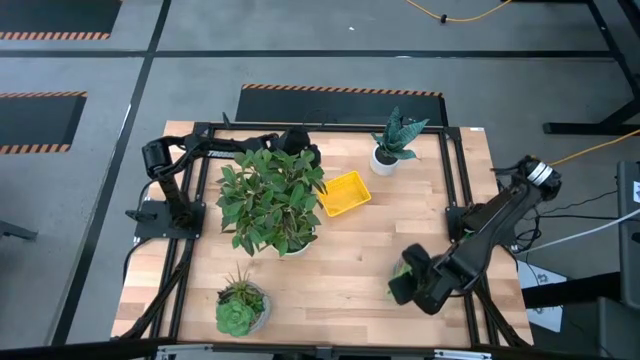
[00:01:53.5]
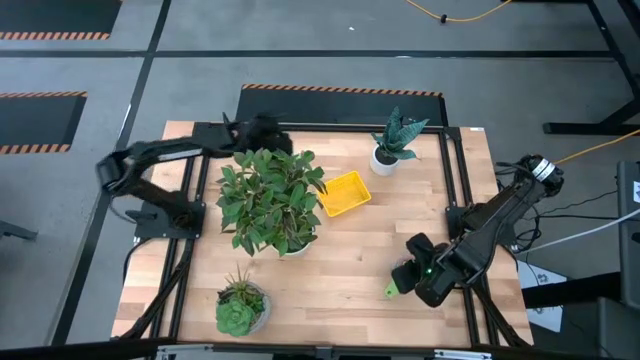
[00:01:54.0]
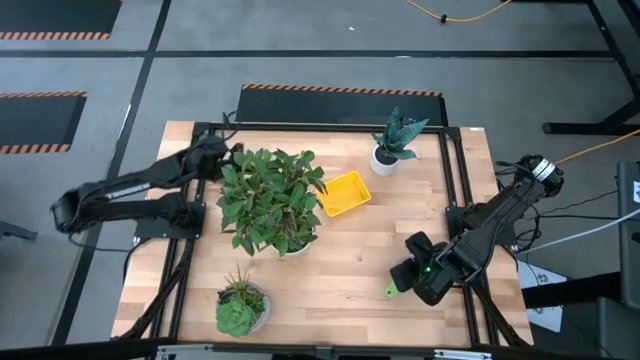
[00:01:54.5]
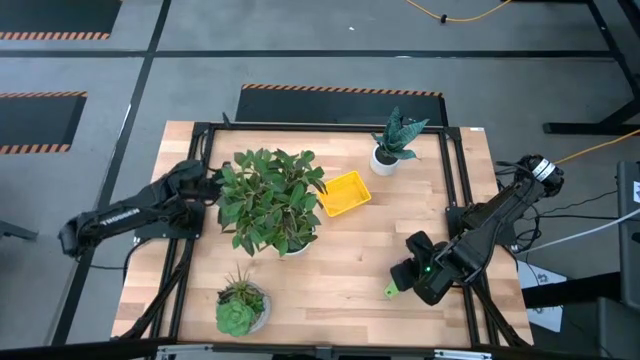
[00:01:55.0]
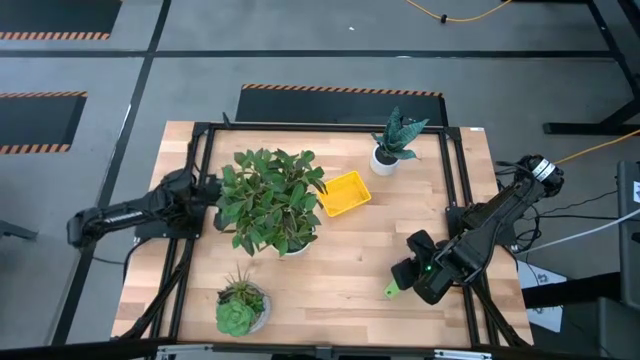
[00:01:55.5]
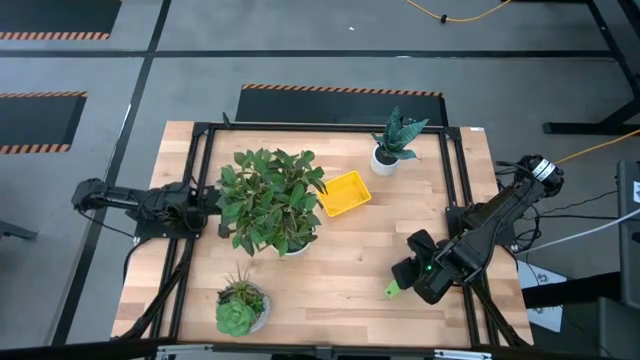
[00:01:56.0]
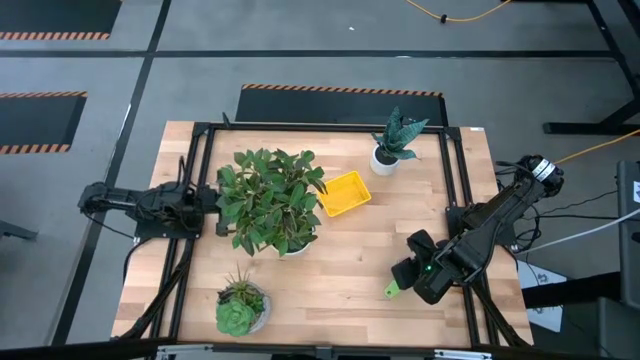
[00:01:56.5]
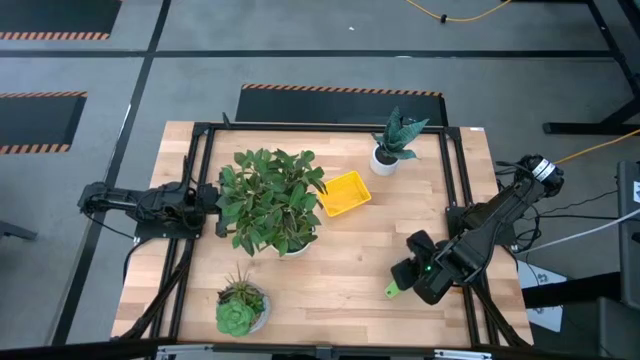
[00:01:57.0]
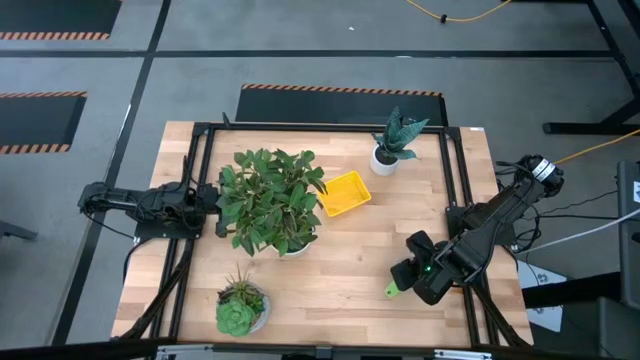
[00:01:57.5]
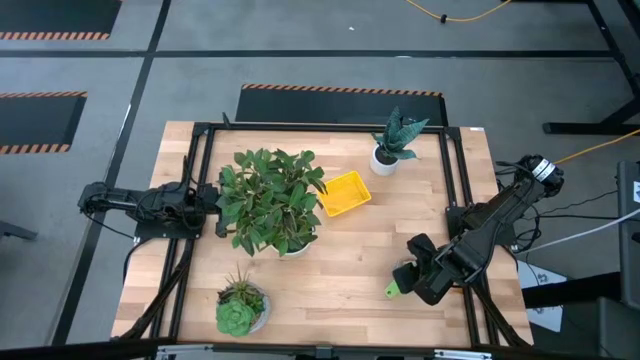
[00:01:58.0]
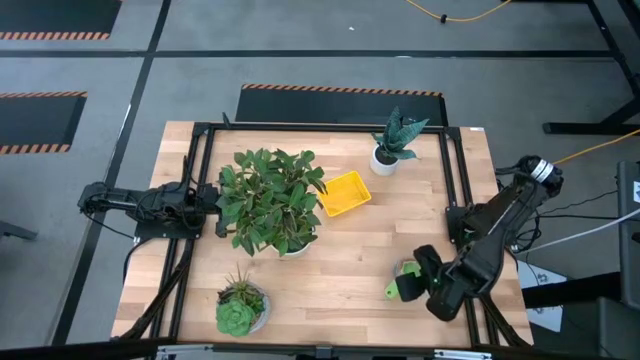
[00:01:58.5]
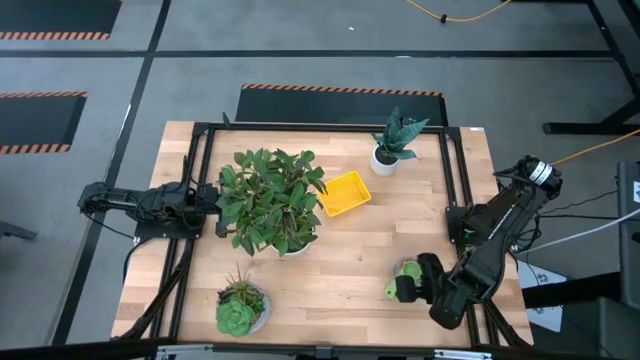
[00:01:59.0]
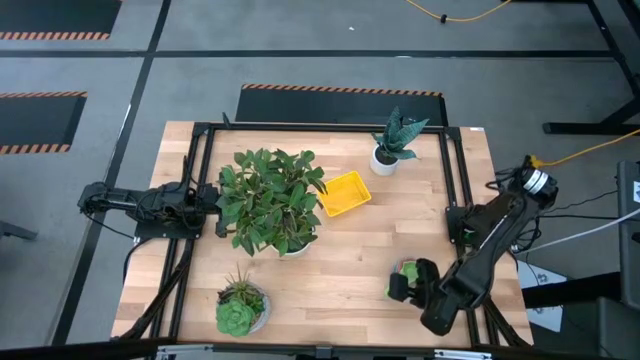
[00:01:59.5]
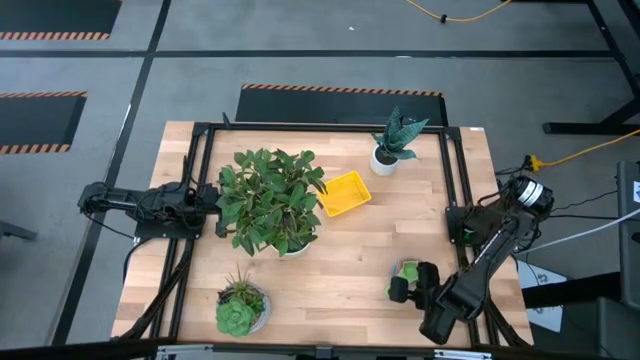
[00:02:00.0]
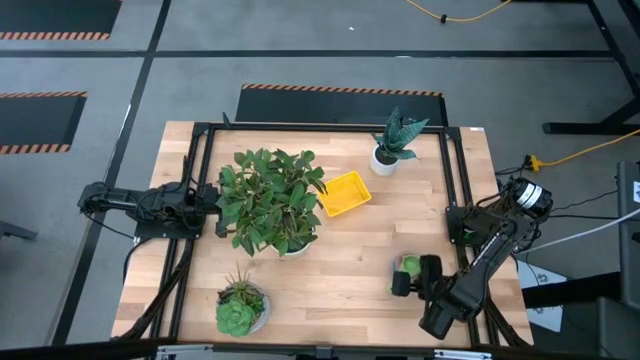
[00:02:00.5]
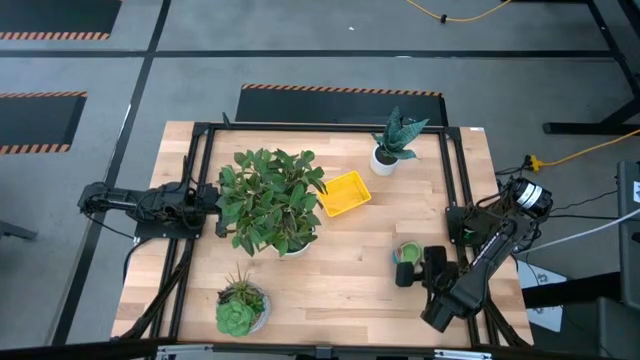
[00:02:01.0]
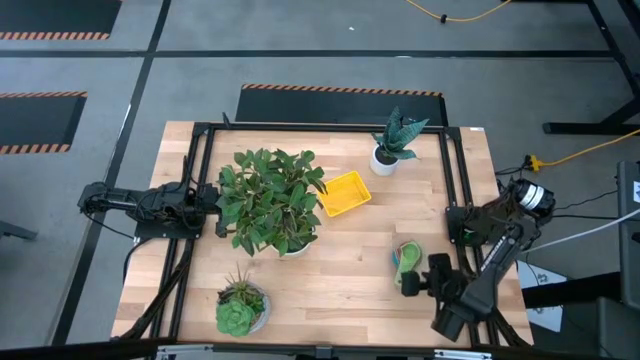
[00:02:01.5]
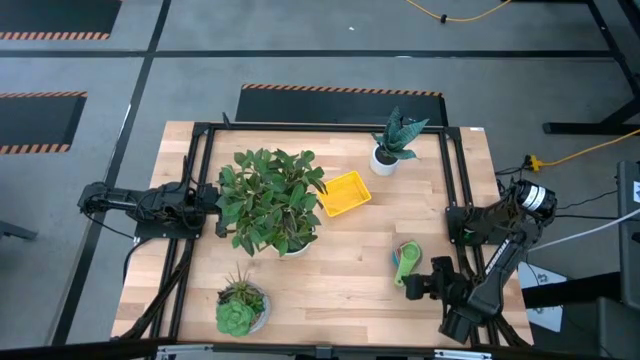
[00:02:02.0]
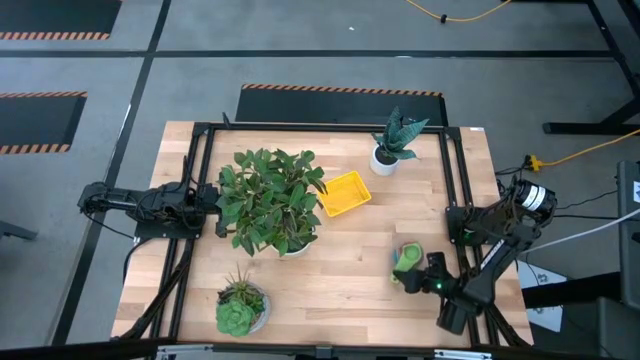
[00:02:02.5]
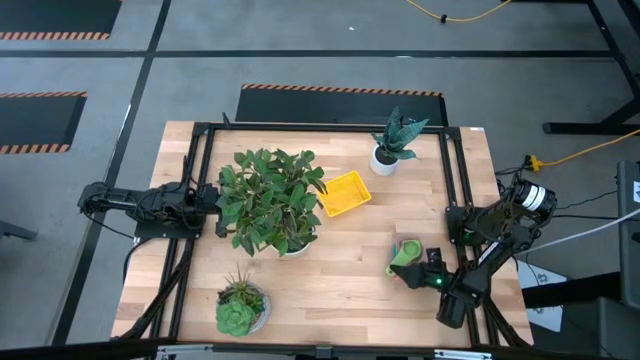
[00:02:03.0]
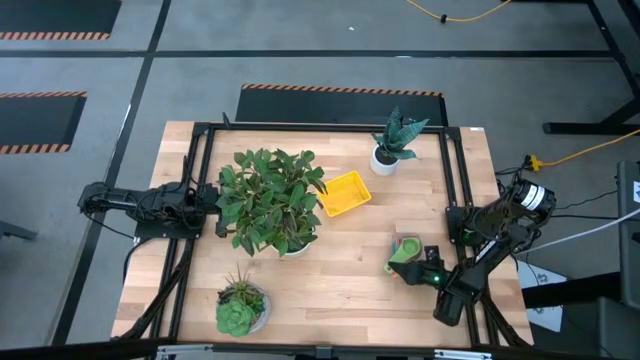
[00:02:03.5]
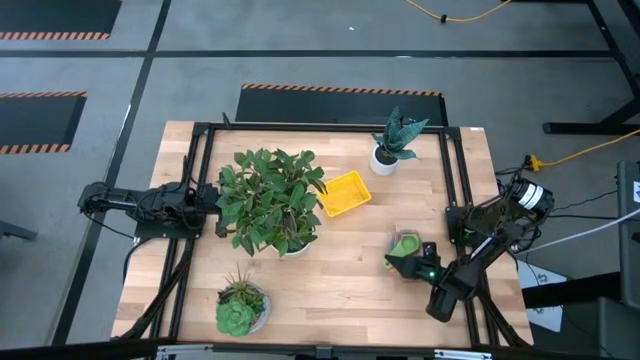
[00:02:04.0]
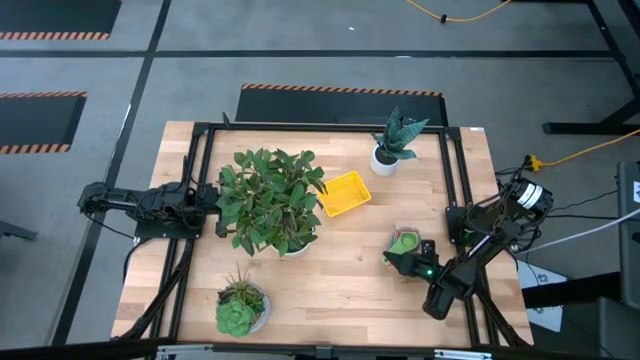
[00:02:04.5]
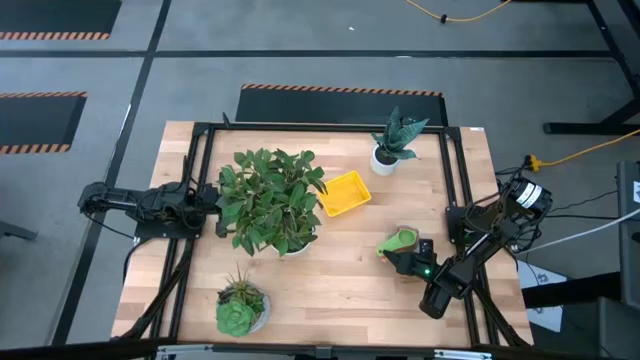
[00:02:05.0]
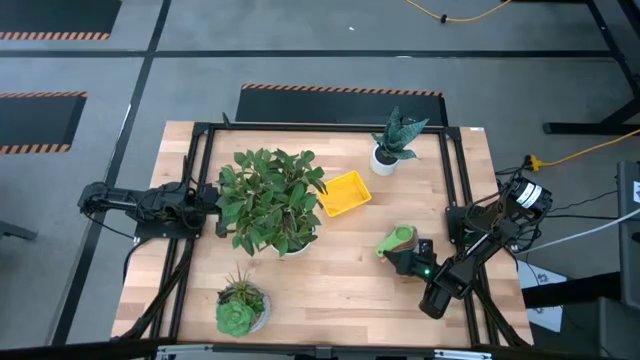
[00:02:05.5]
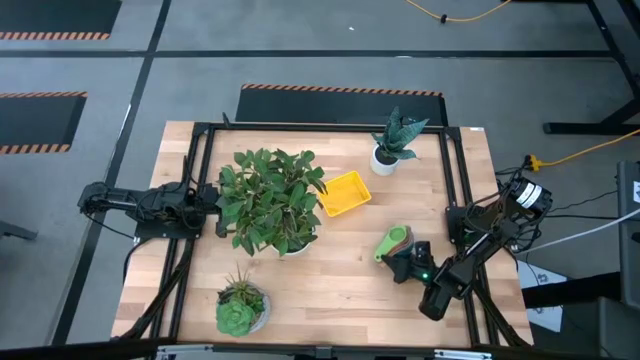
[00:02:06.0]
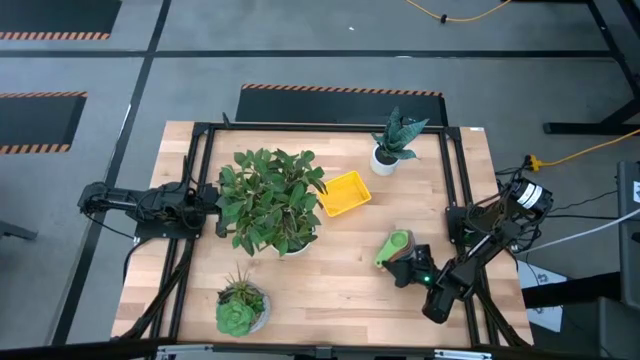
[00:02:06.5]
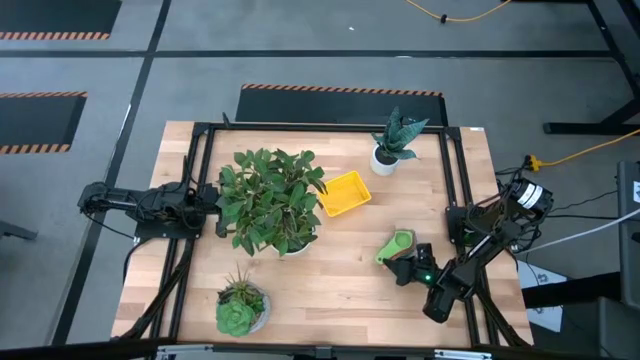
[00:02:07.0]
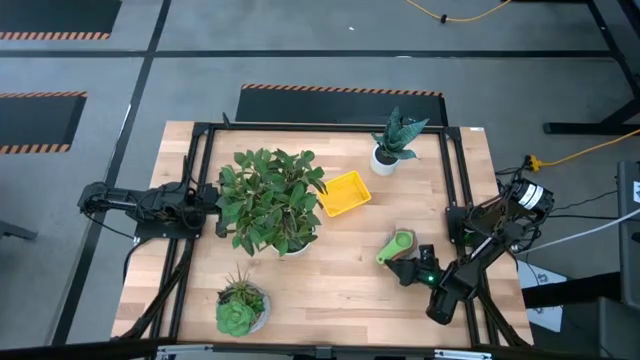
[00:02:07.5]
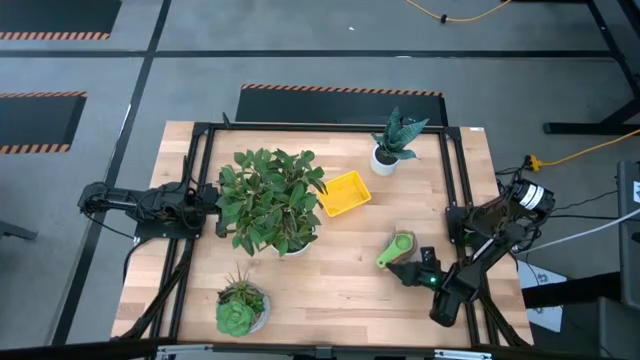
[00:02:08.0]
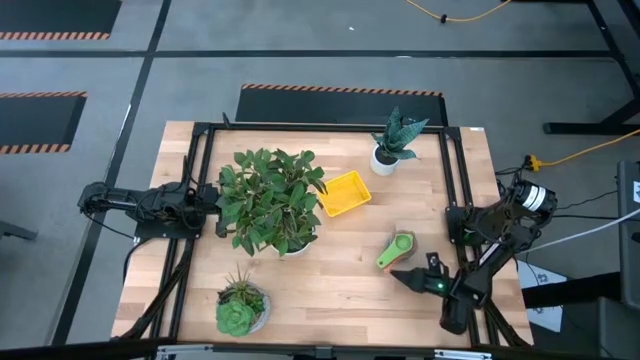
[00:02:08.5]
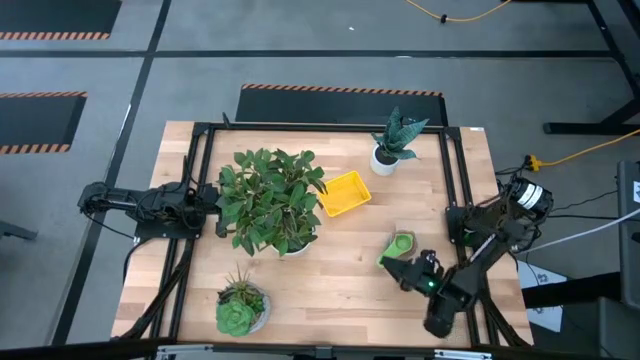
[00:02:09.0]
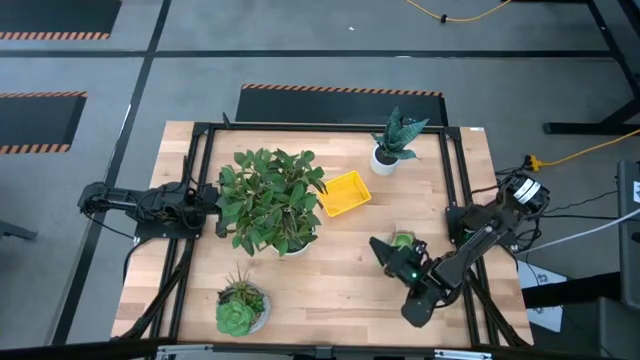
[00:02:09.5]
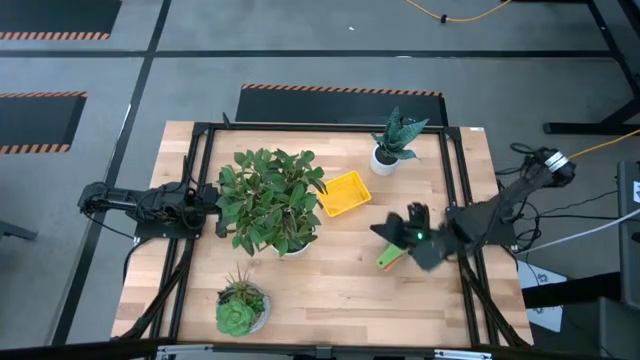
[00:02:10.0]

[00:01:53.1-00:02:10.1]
Task: Nest measuring cups in basket
Put the nested measuring cups into the yellow basket
